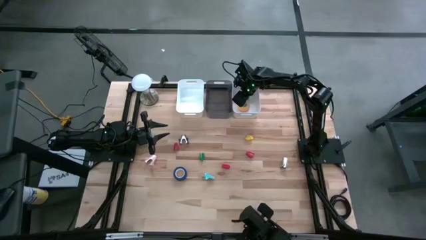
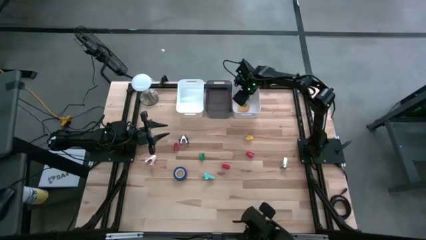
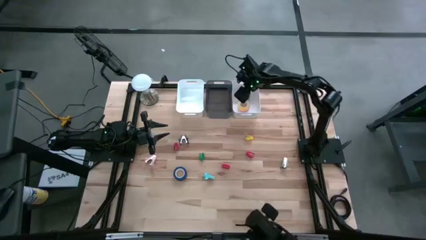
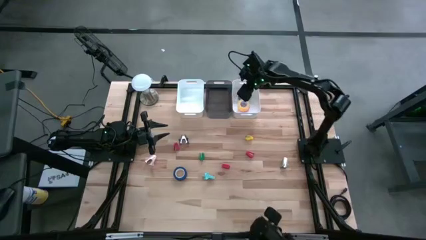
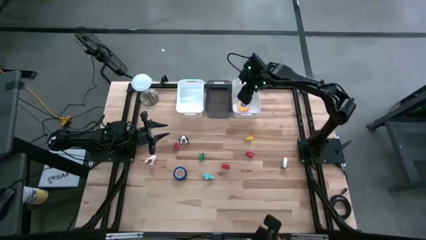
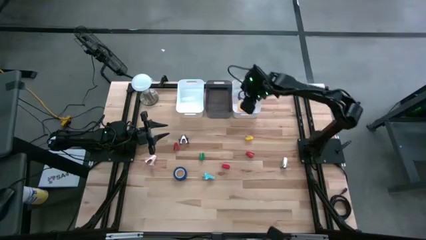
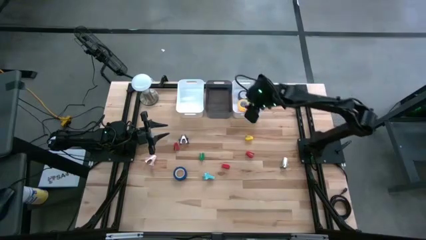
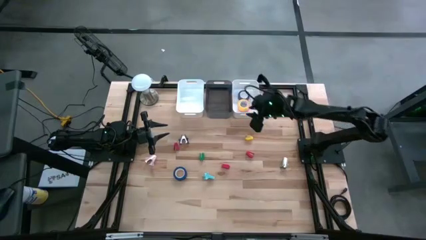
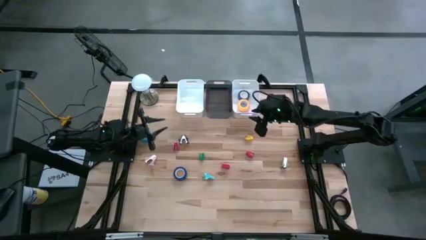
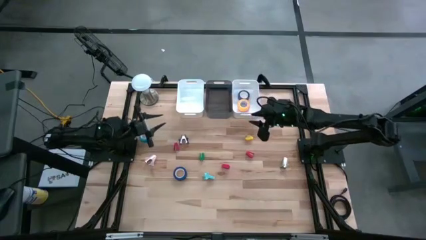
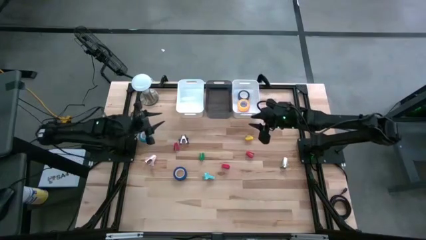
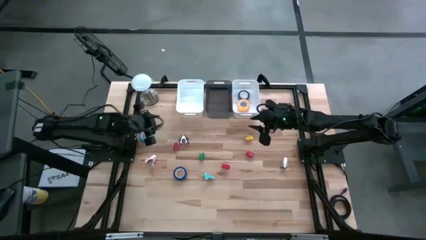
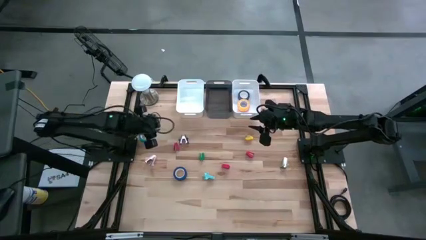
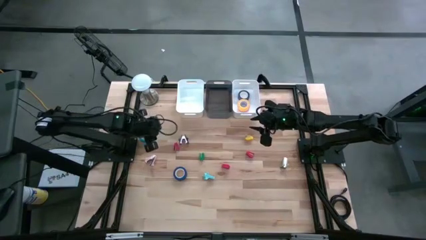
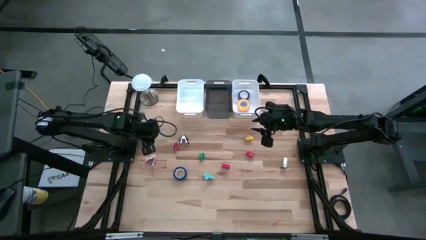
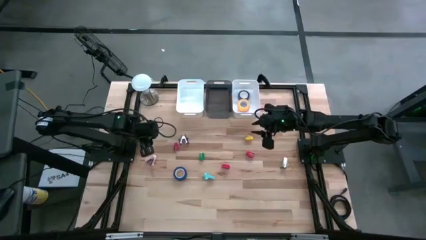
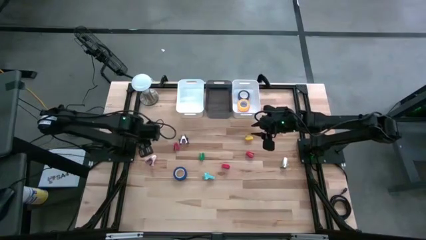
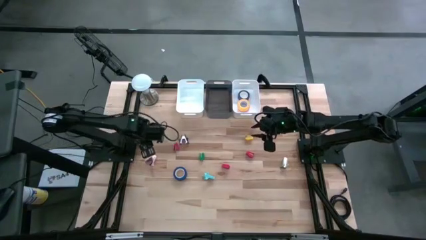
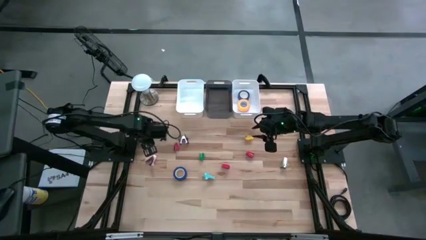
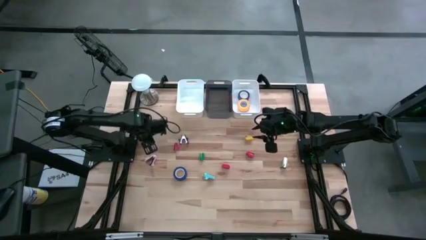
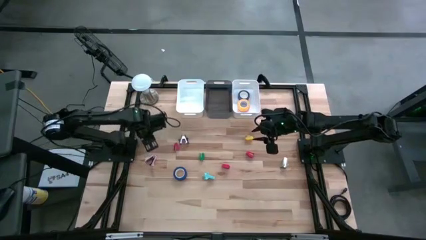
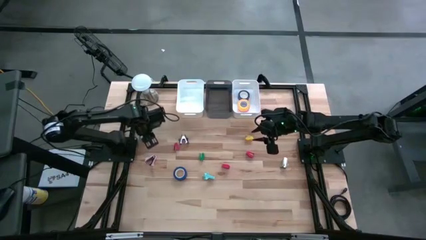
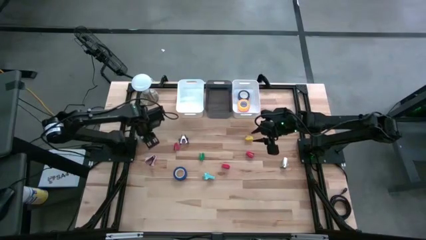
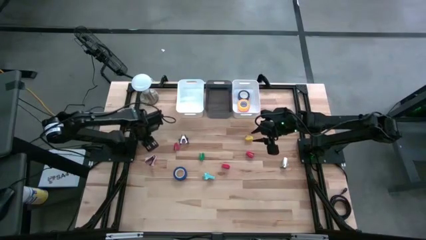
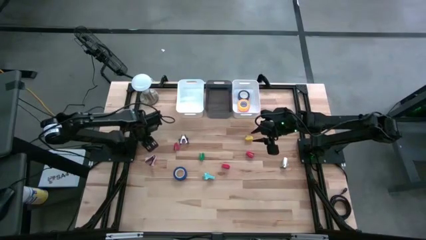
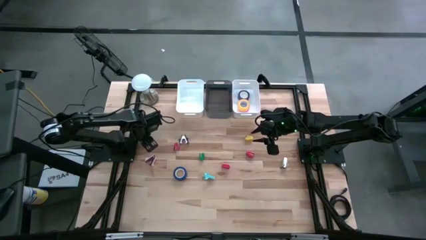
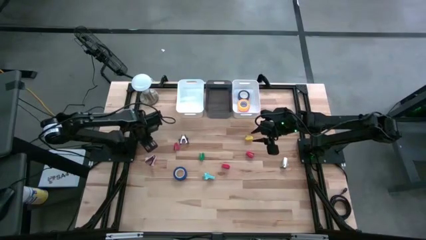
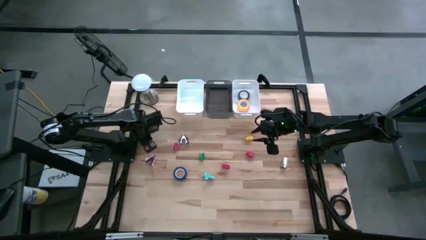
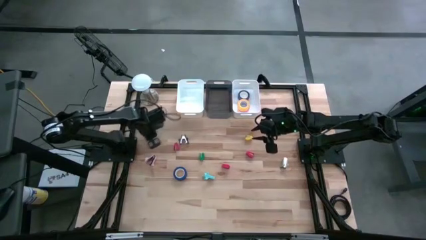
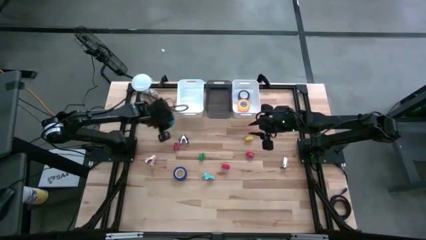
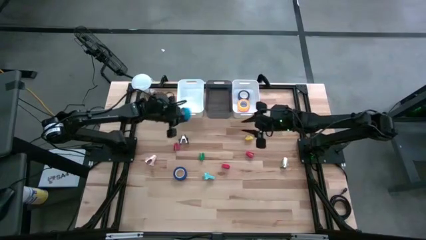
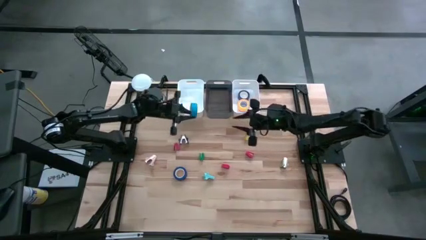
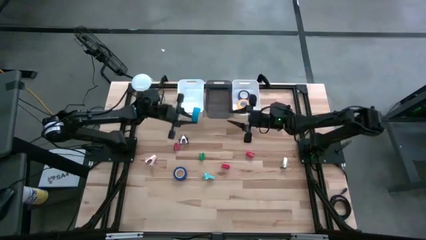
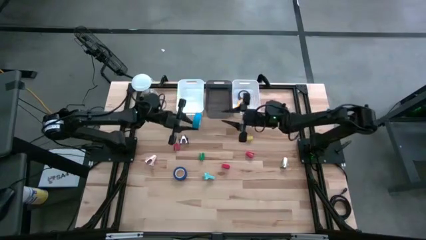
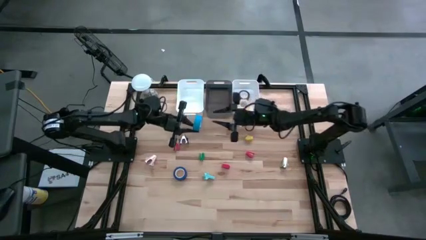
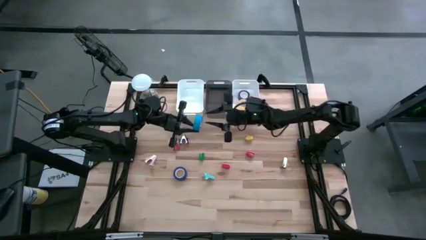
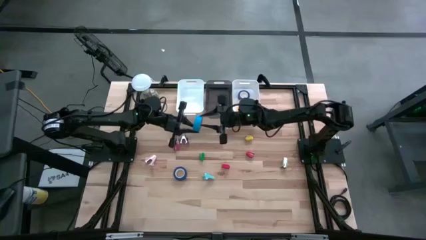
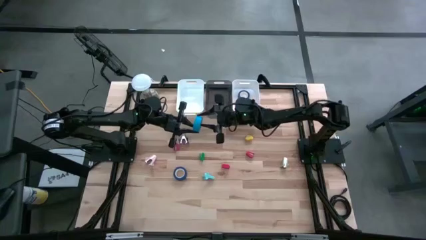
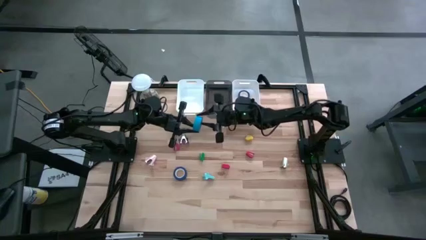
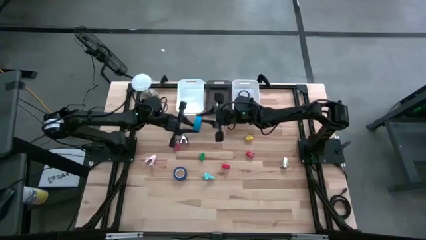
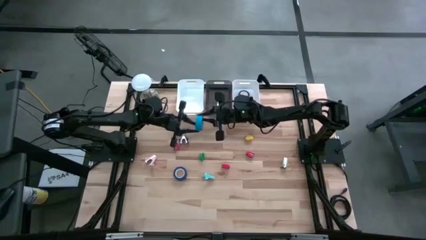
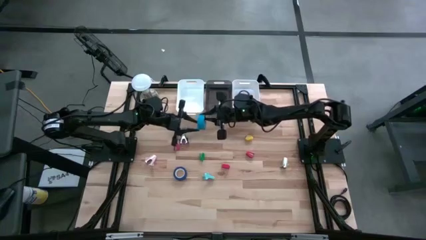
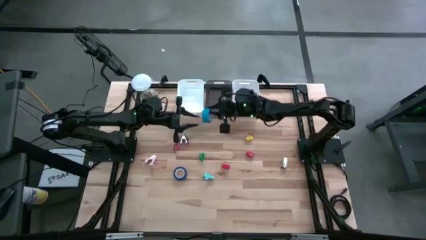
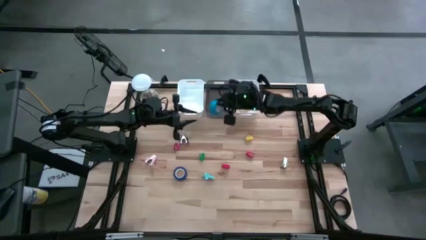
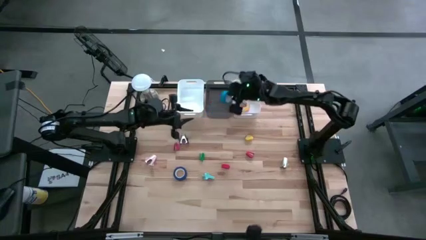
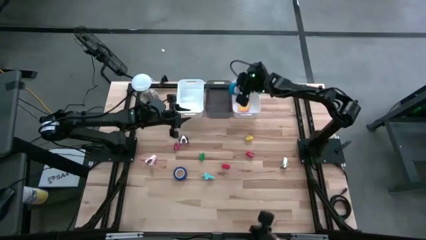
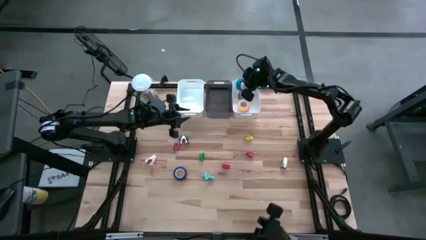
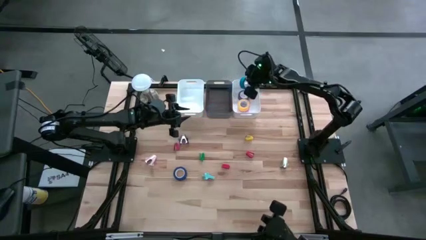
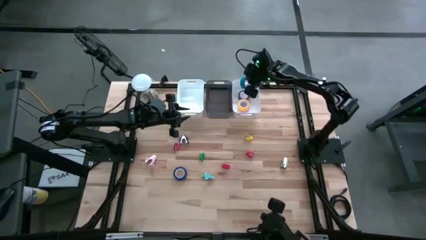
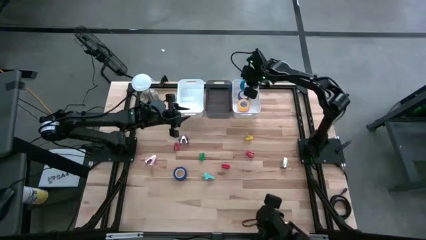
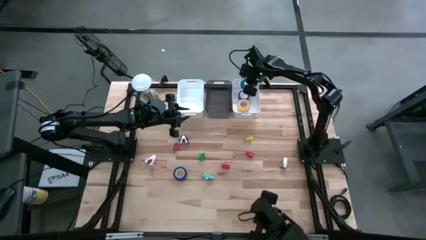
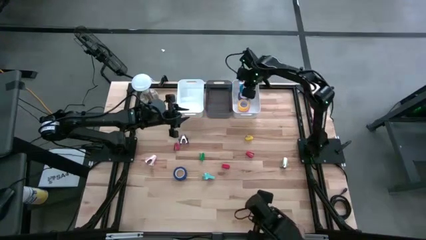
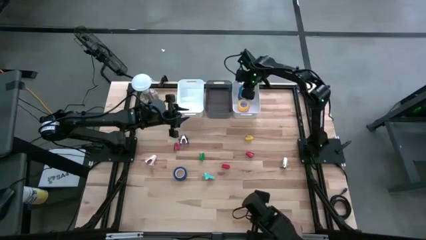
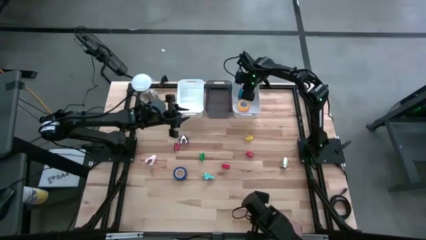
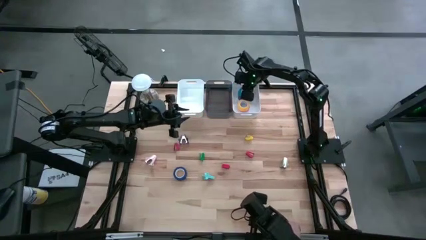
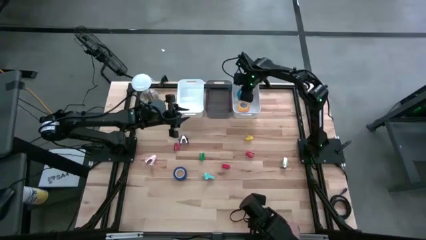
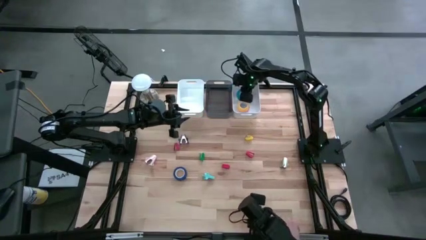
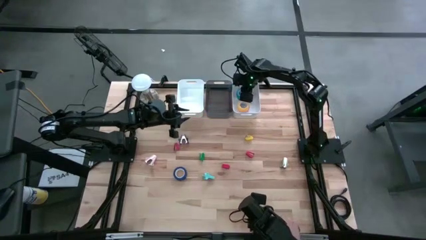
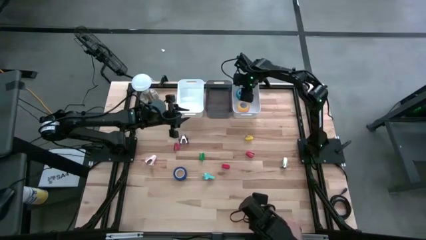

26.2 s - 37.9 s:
Task: Pick and place Stapler, Stapler remover, tape
Put the light blue tape into the right white bin

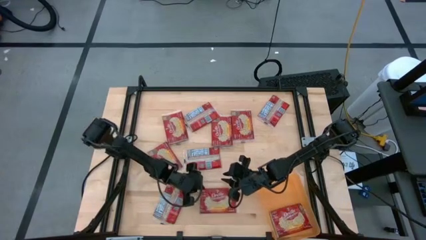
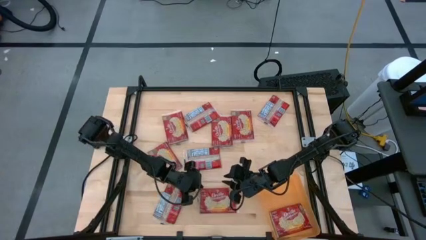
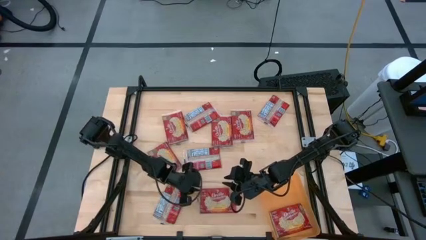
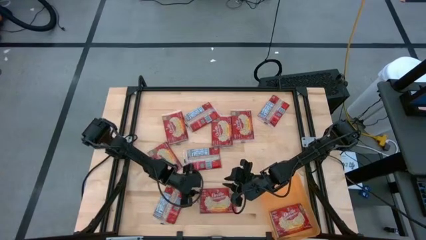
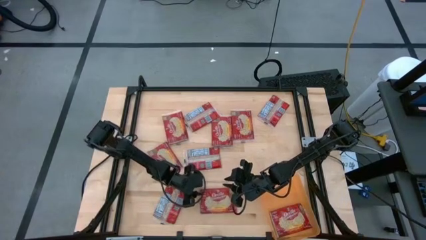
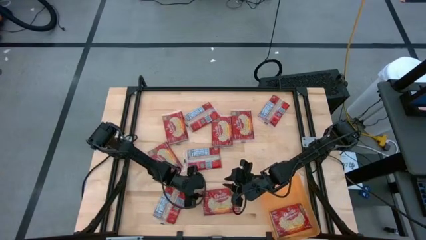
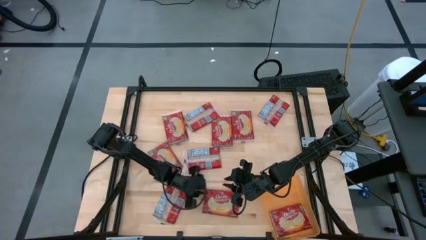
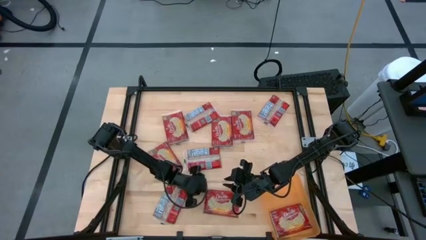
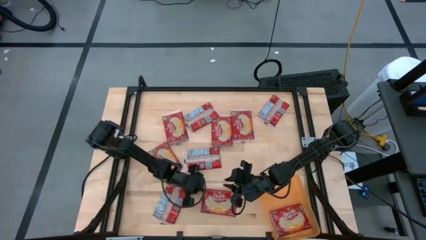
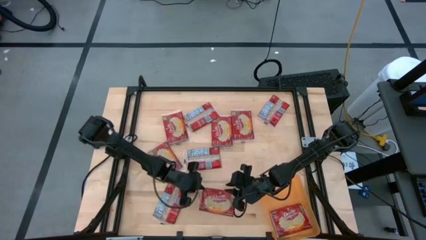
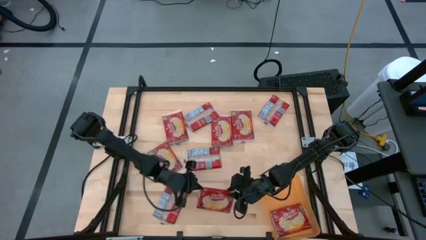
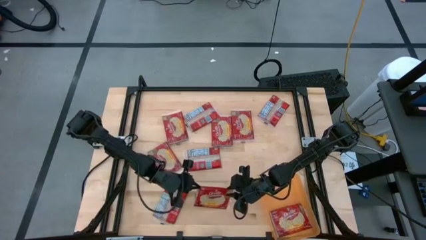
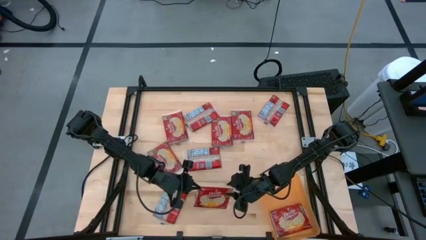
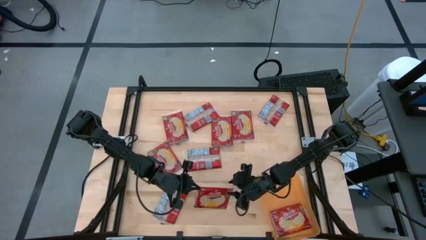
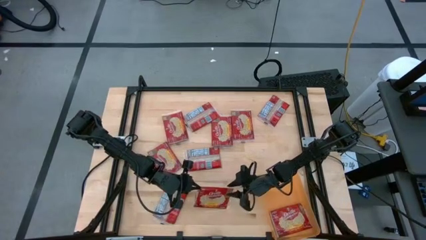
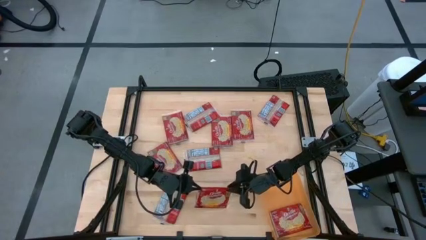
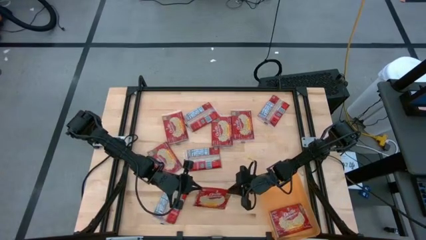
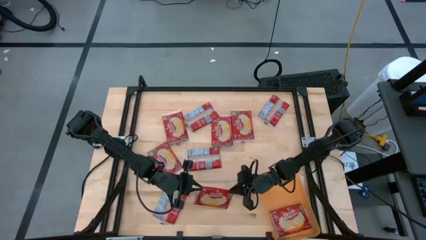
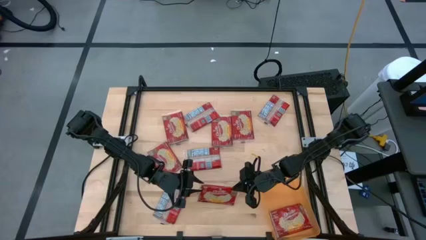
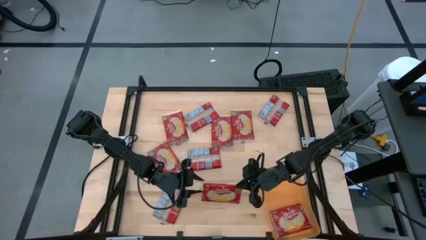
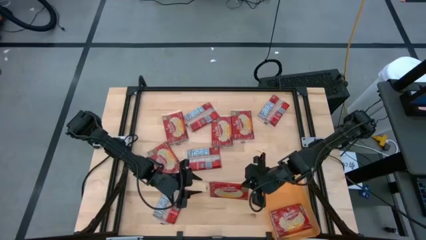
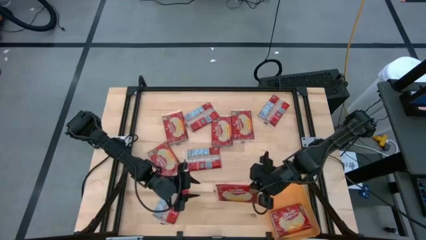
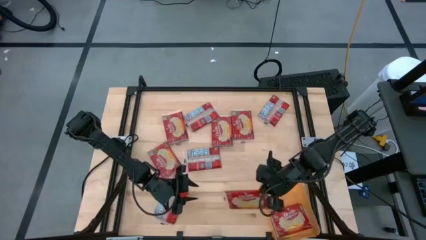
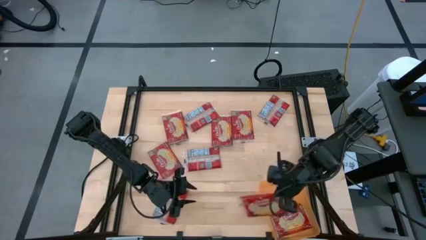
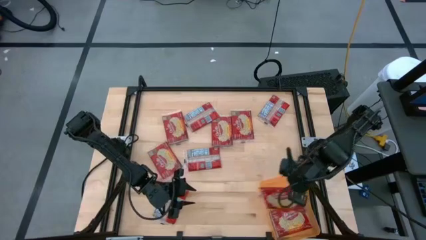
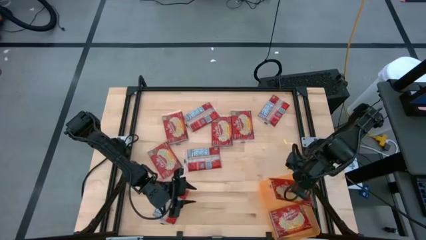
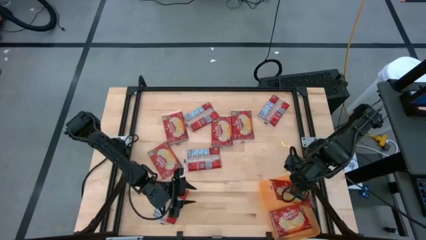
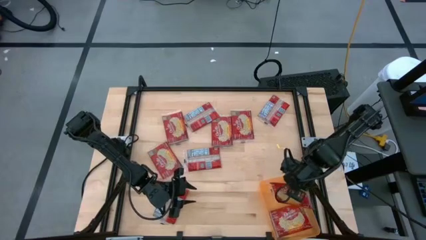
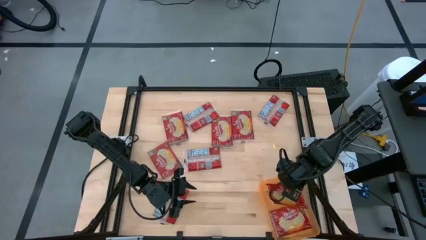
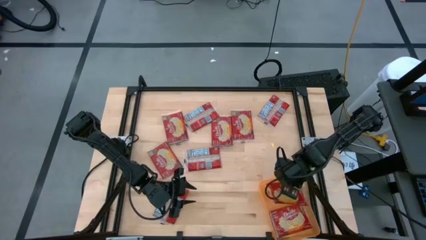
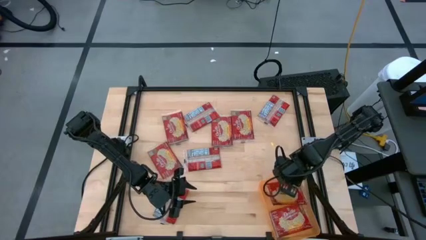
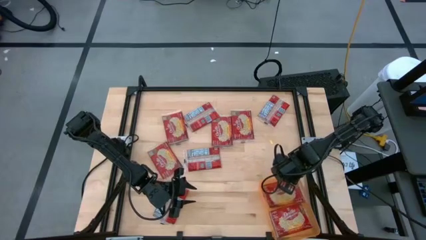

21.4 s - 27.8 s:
Task: Sort popcorn bags into baskets
Put the popcorn pack into the orange bin
